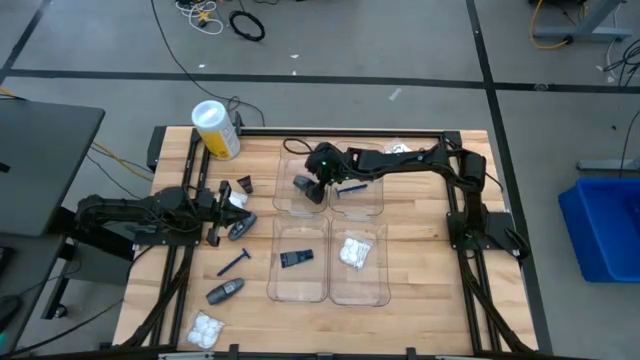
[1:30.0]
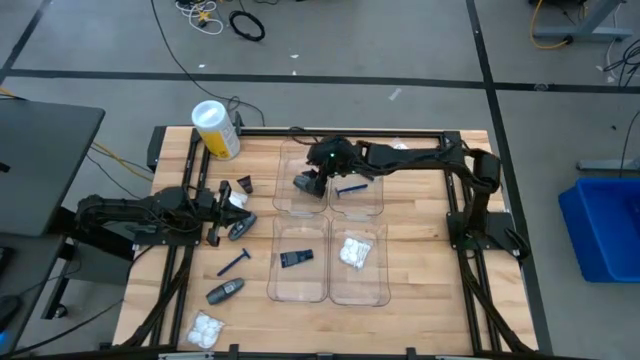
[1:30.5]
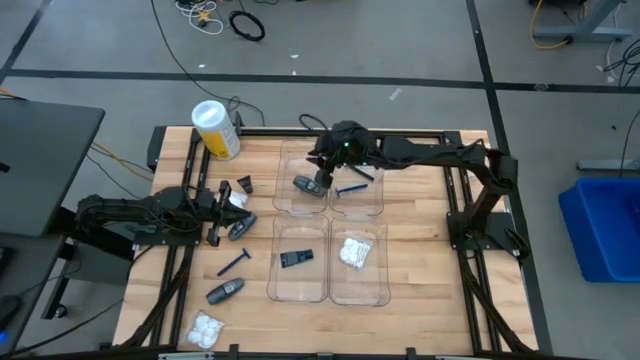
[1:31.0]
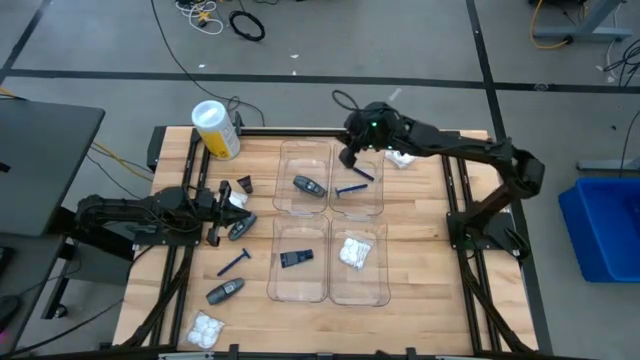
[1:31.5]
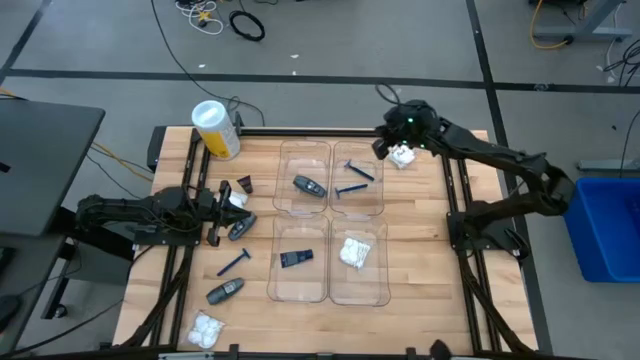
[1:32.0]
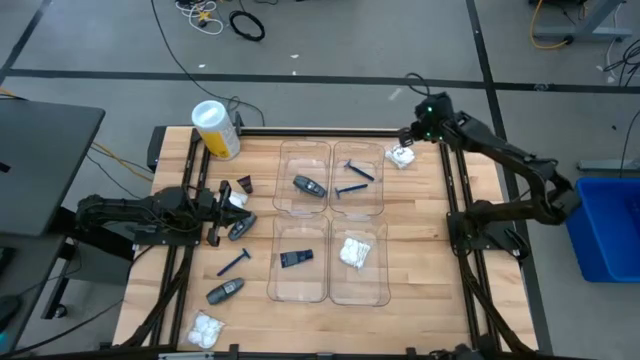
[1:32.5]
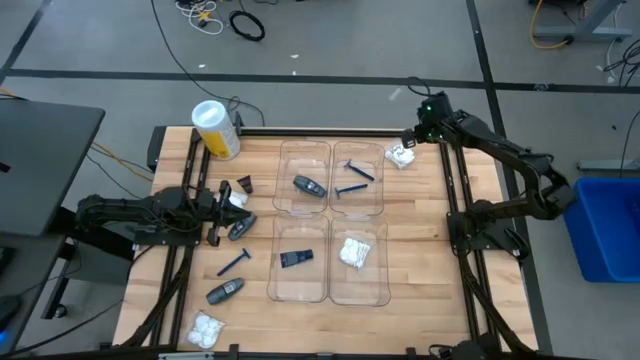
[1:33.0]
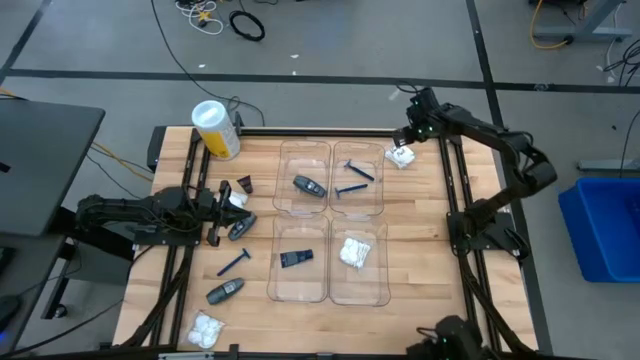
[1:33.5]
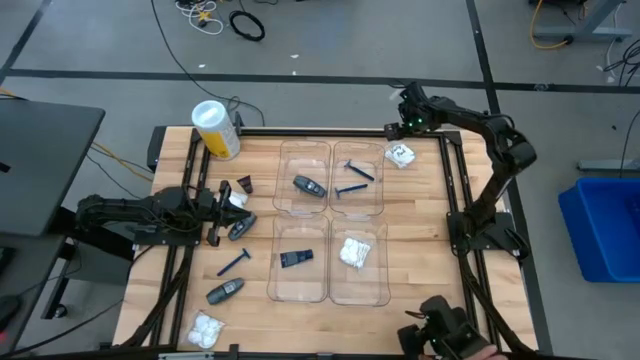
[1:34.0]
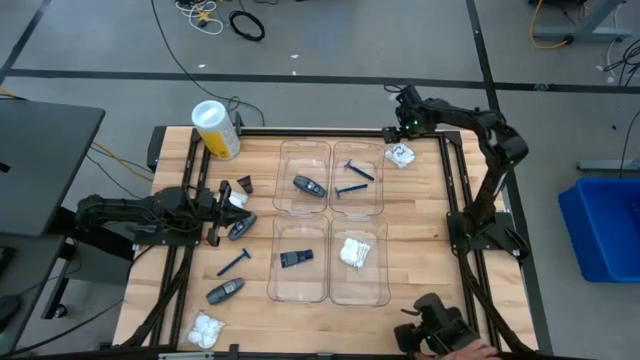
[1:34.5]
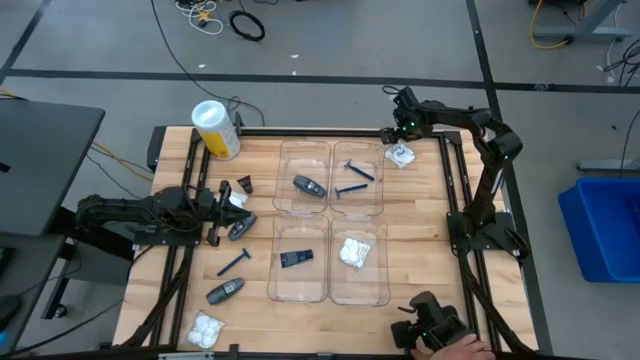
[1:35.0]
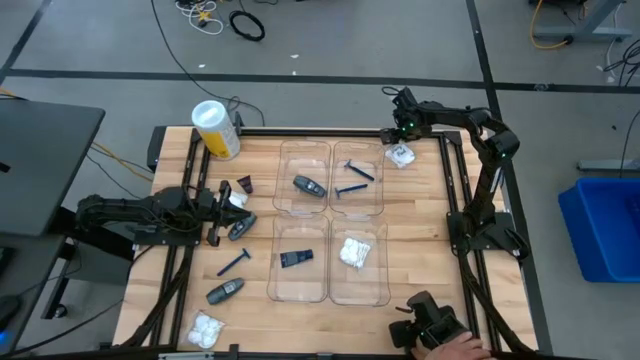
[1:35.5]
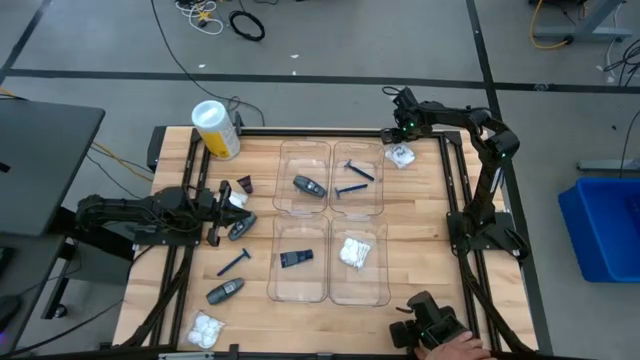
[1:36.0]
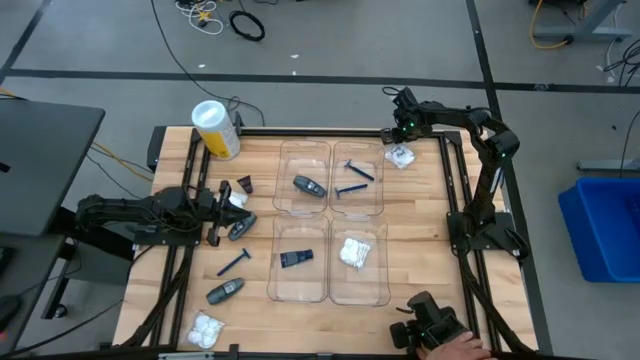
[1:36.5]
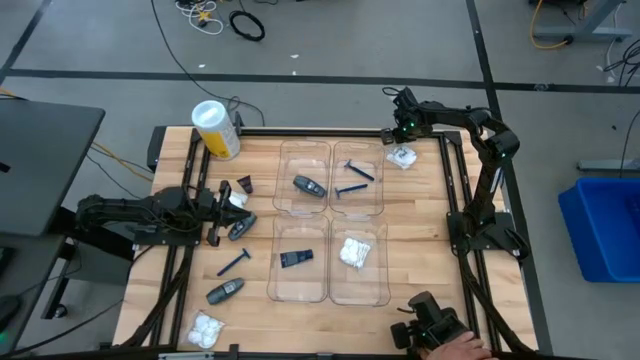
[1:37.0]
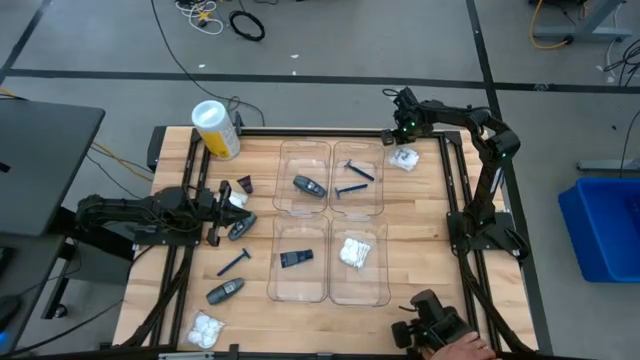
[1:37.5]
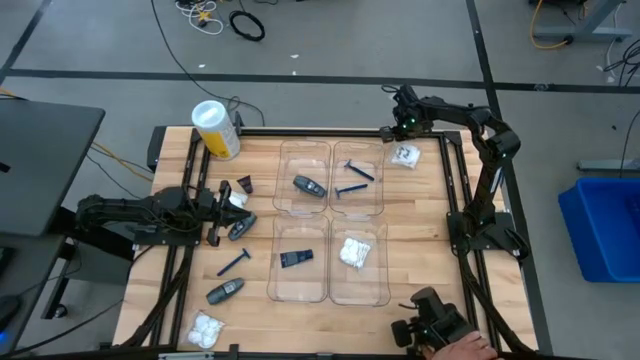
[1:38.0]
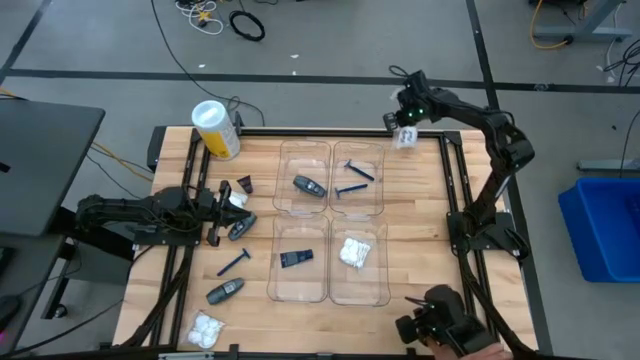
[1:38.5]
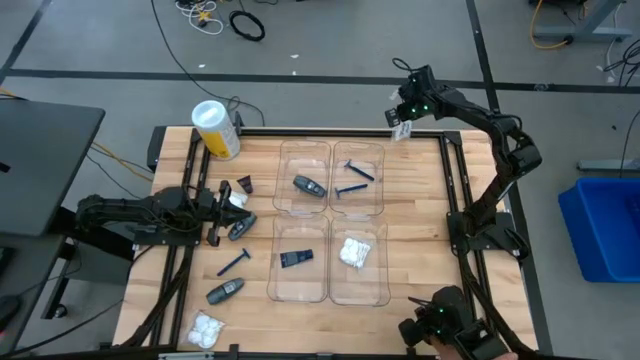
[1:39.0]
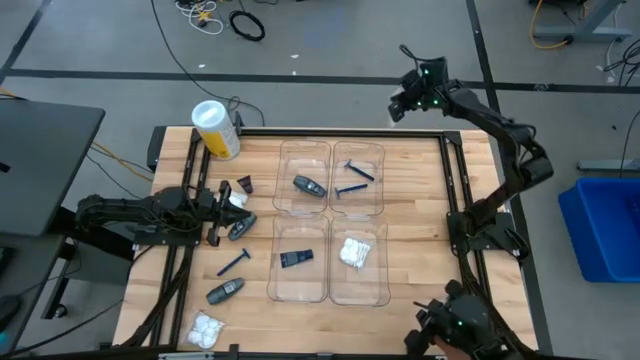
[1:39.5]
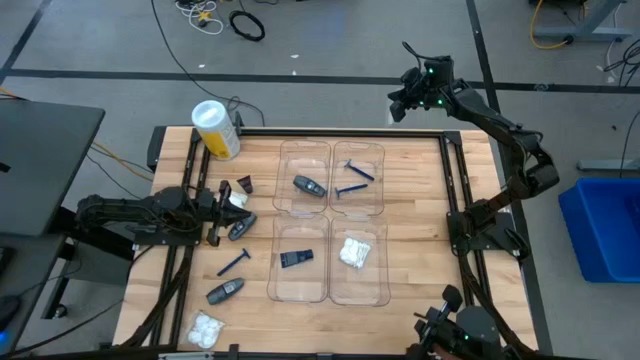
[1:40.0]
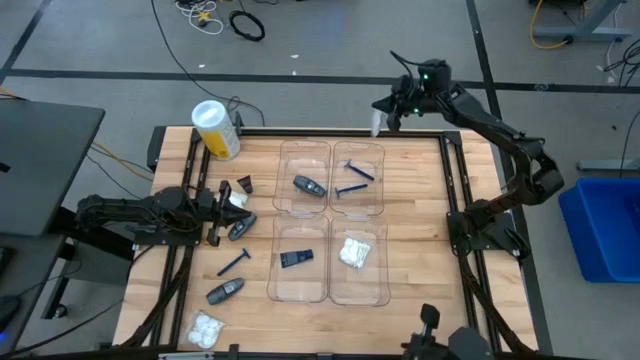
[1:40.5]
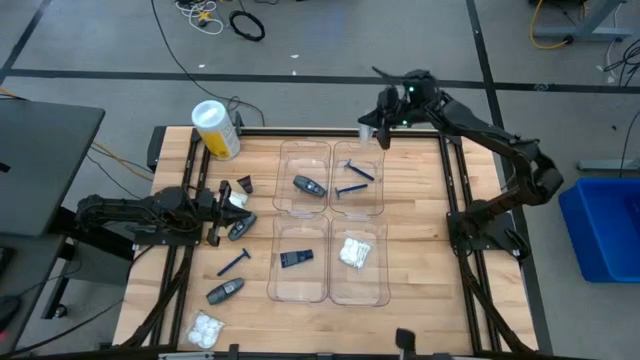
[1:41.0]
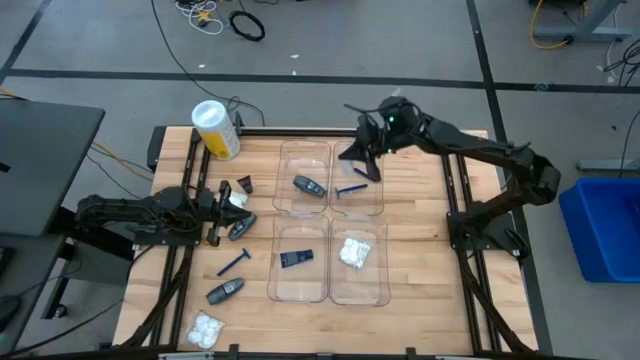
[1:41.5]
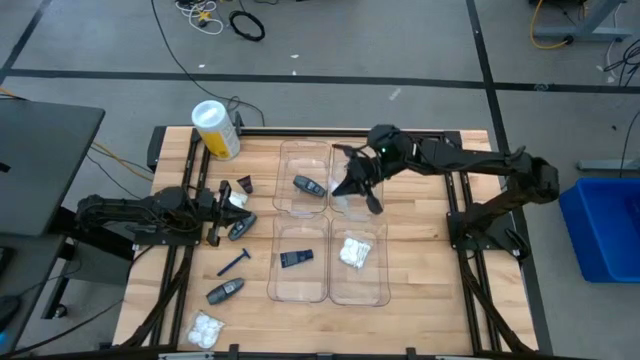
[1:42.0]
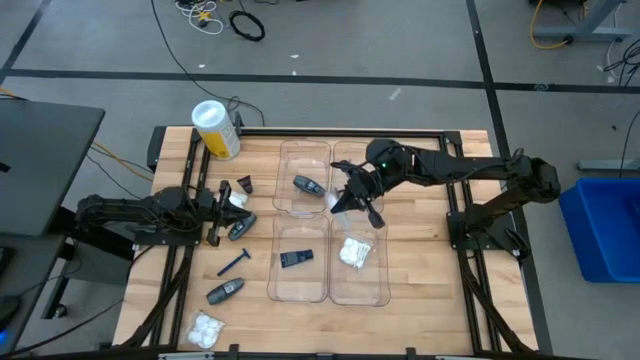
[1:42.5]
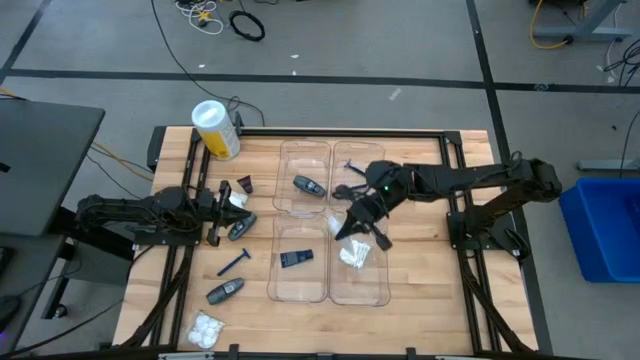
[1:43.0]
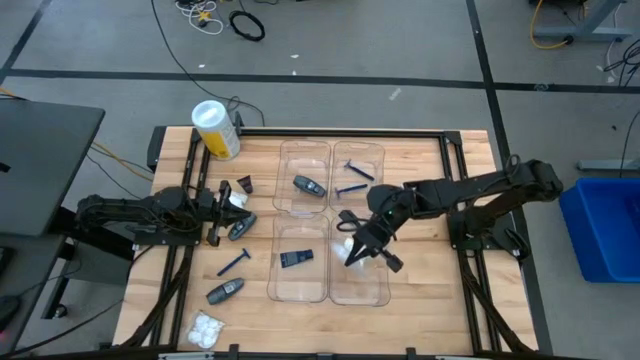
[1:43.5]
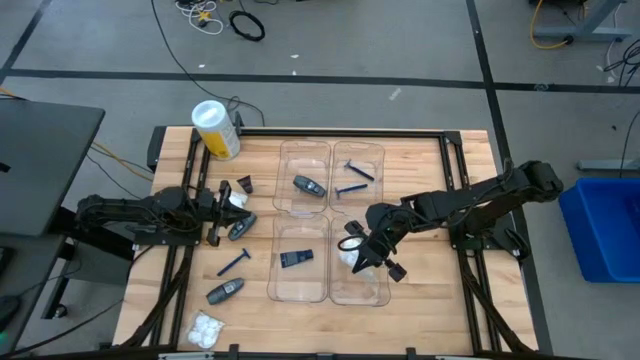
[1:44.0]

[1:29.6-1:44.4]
Task: Pick & Place Travel size toiletries
Put the cotton pack into the bottom right transparent bin
